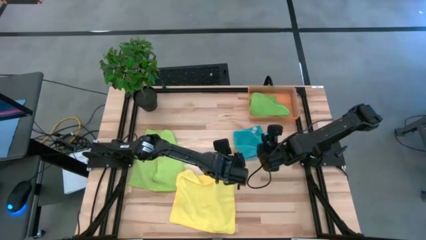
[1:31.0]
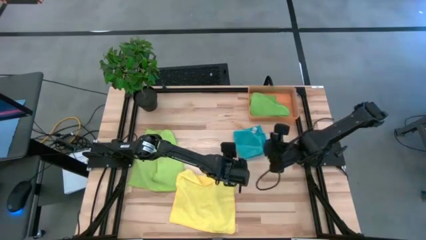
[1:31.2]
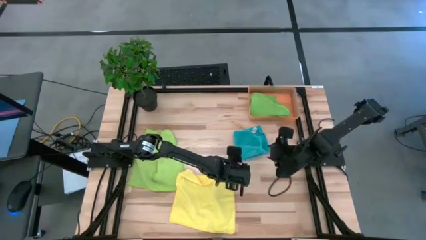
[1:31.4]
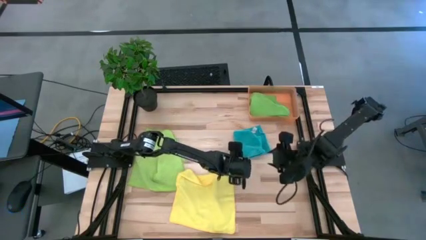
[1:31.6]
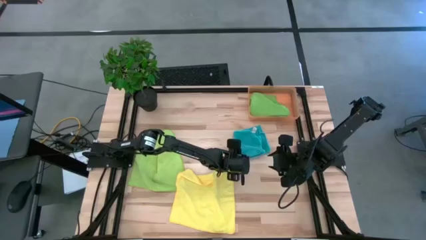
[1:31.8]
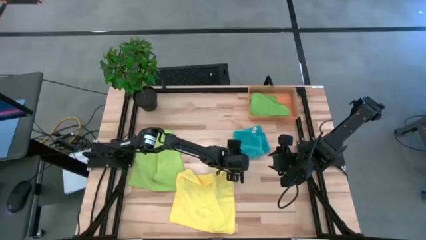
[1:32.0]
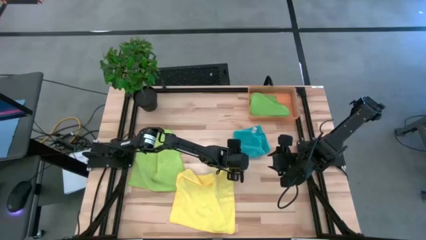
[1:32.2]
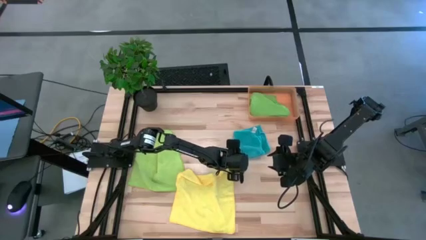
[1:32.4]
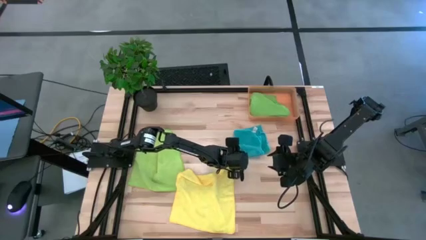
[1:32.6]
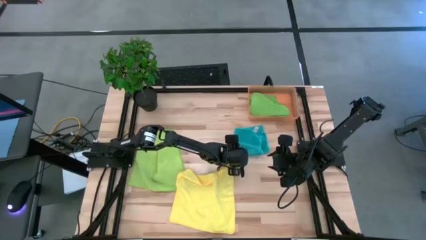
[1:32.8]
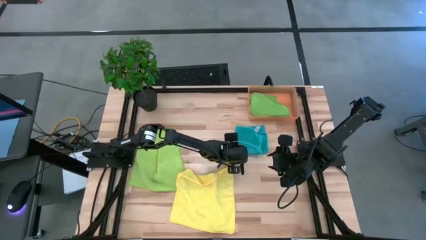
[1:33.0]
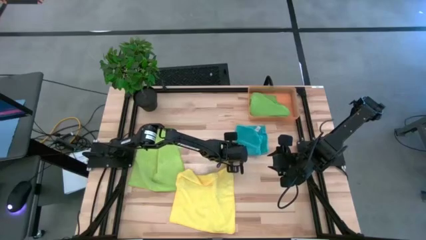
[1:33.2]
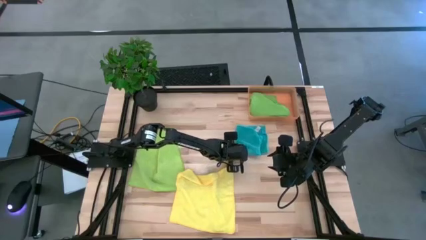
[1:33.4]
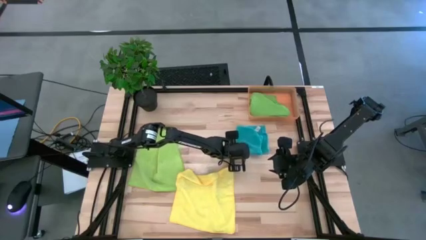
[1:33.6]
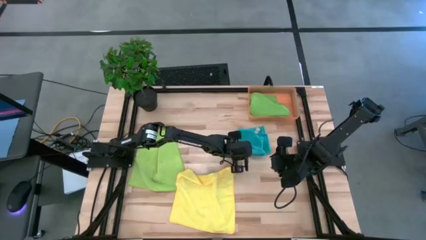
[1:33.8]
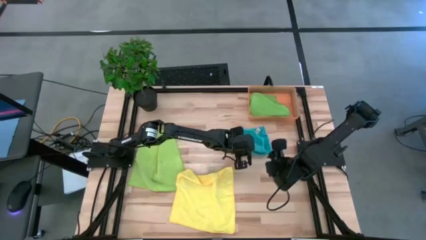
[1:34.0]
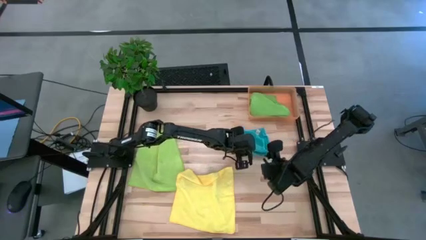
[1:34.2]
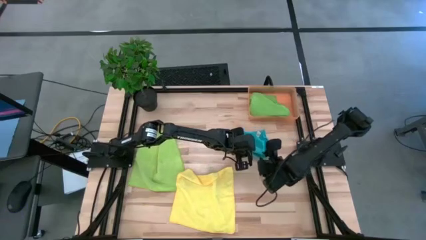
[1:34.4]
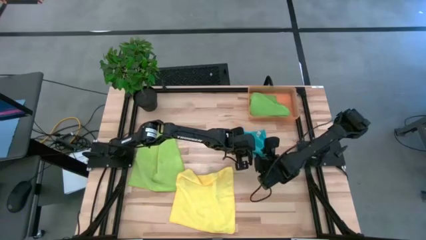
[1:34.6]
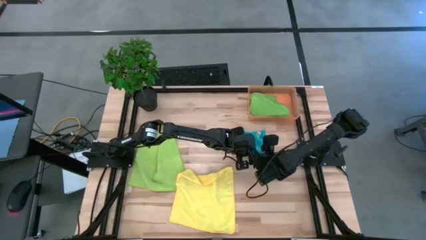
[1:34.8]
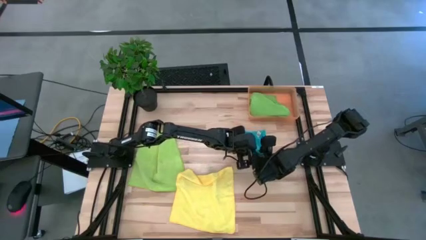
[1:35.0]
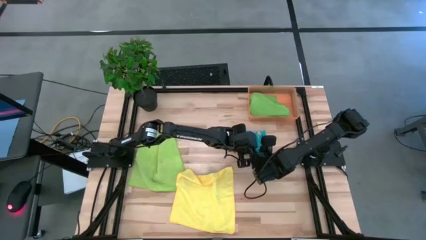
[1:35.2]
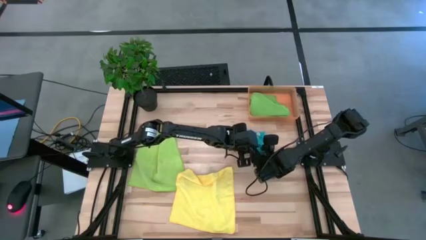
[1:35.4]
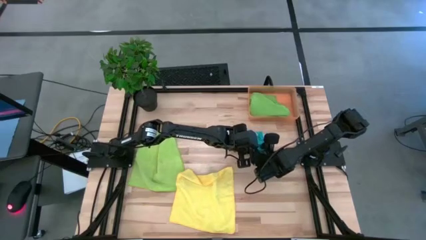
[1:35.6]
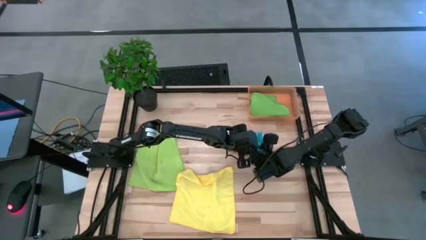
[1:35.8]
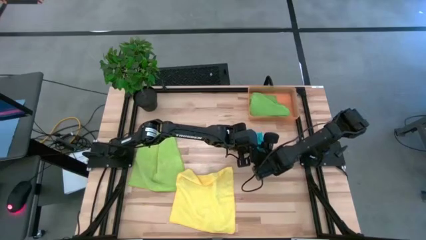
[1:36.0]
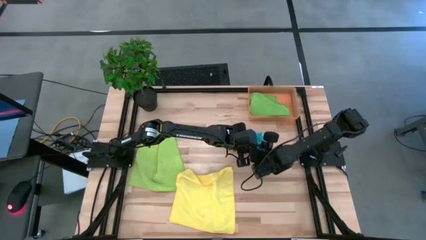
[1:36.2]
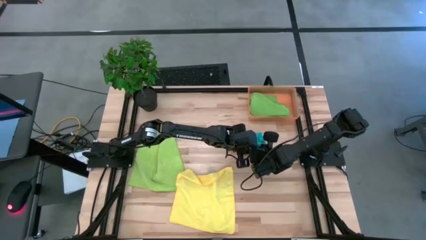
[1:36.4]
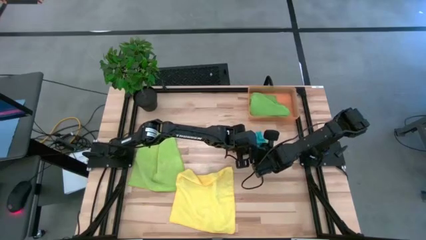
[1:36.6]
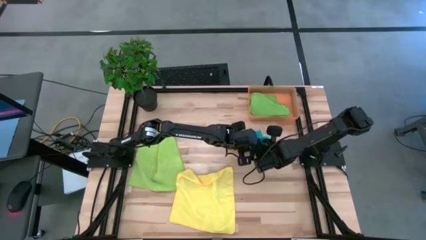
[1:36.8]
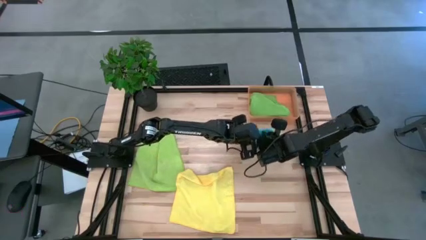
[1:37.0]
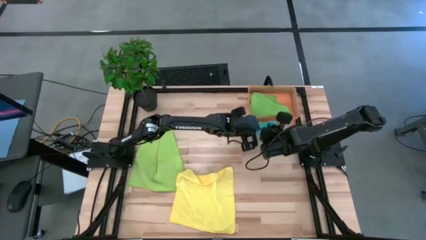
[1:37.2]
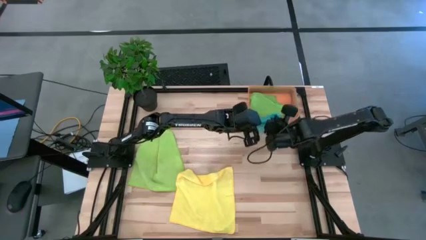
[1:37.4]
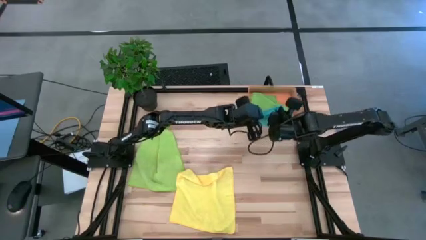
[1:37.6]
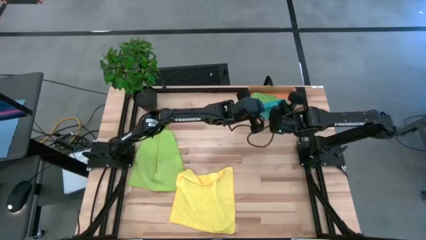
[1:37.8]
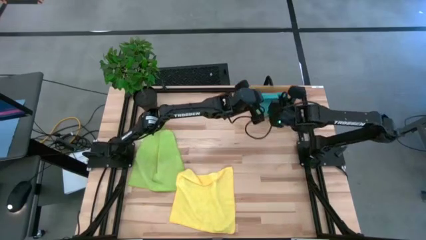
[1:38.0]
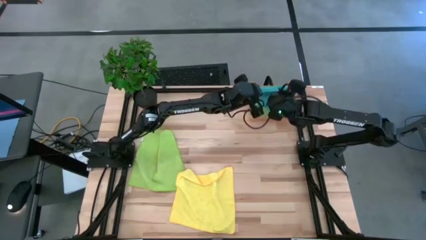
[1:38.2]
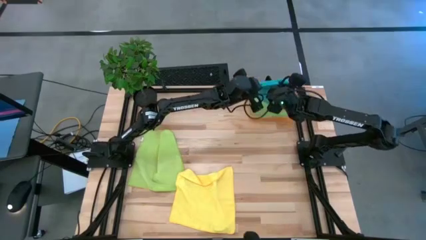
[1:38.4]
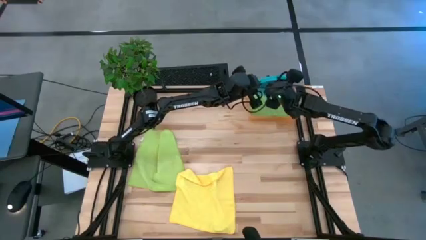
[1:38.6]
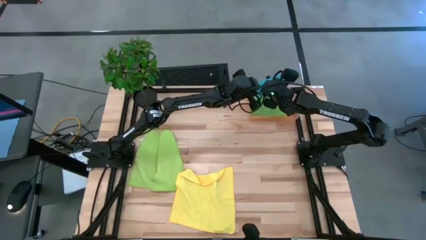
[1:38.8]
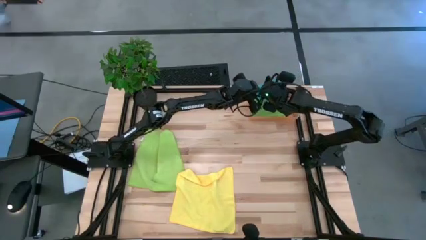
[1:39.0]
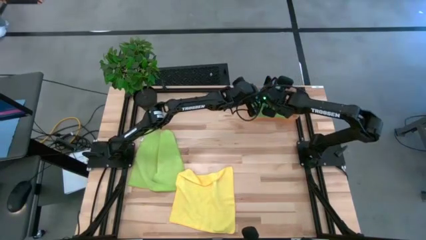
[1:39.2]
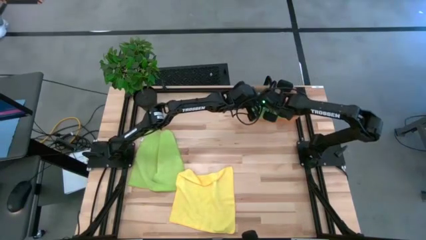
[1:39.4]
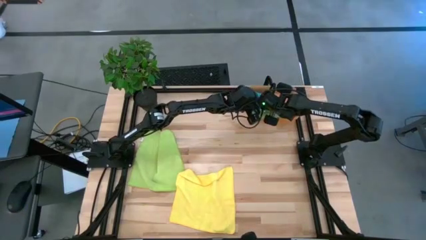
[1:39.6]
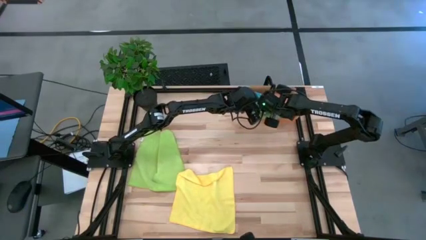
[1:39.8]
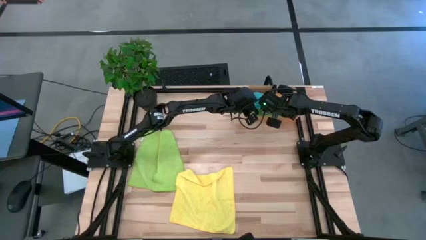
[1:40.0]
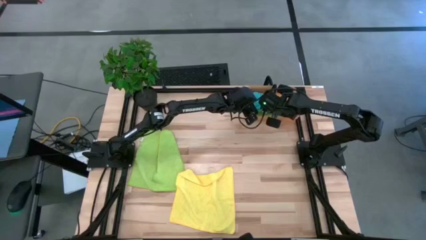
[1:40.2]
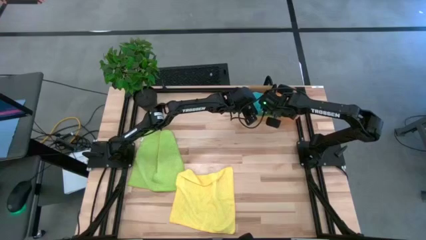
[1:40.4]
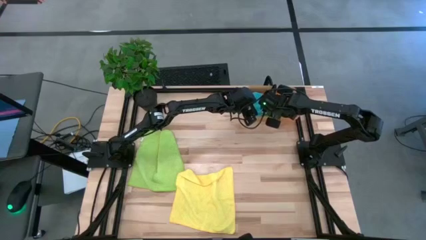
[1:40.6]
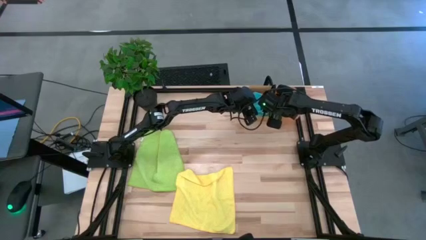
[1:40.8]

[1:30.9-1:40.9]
Task: Fold microfiber towels
Put the blue microfiber towel into the orange bin
